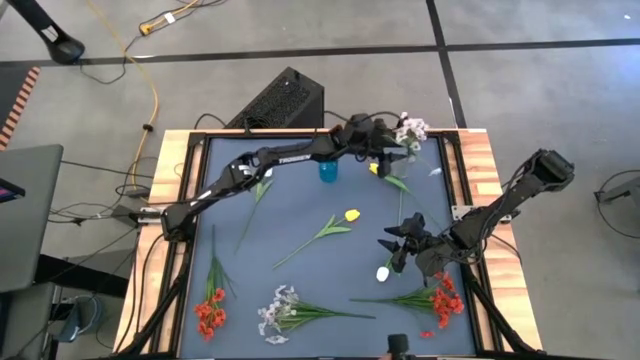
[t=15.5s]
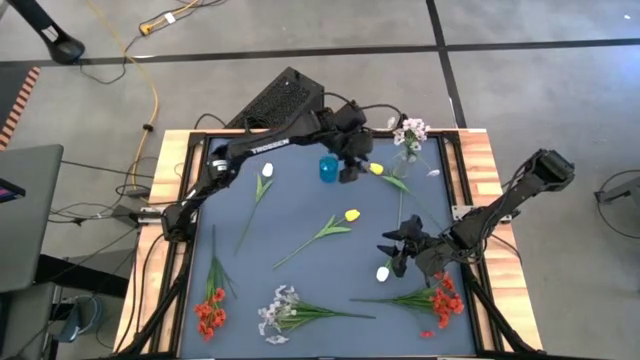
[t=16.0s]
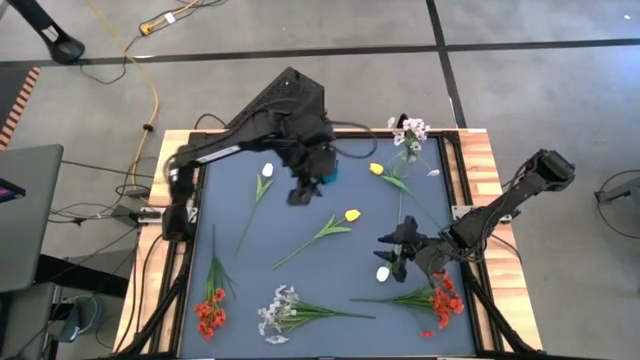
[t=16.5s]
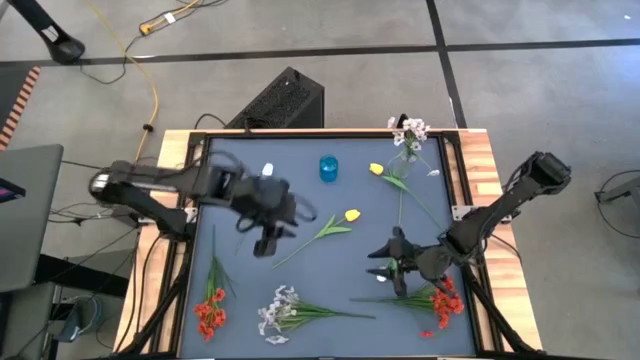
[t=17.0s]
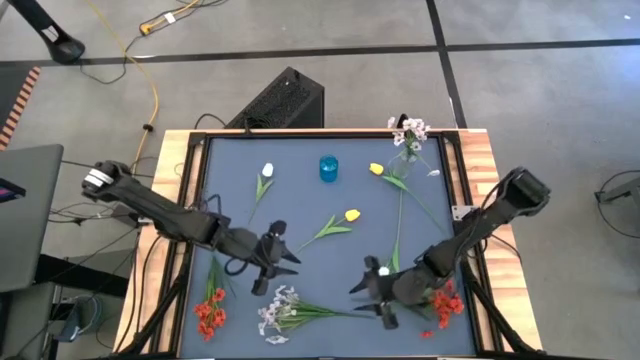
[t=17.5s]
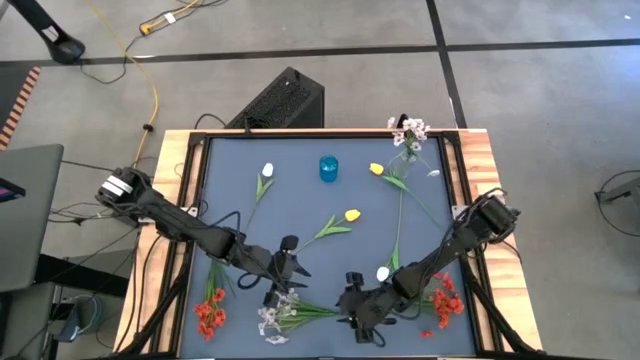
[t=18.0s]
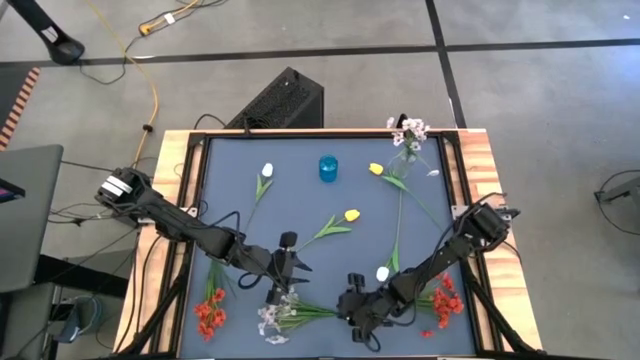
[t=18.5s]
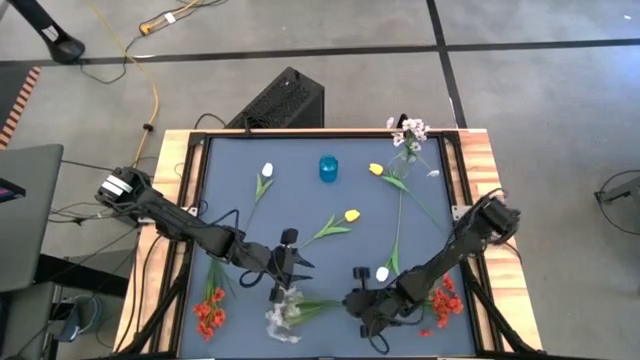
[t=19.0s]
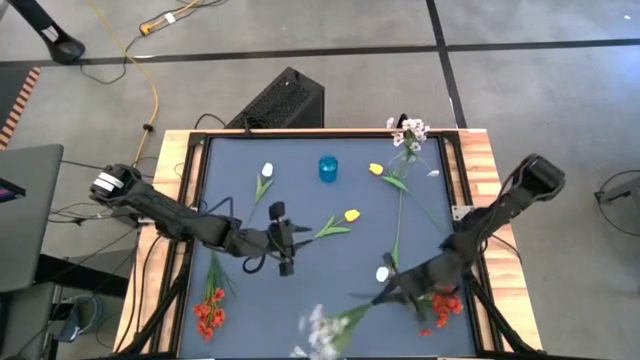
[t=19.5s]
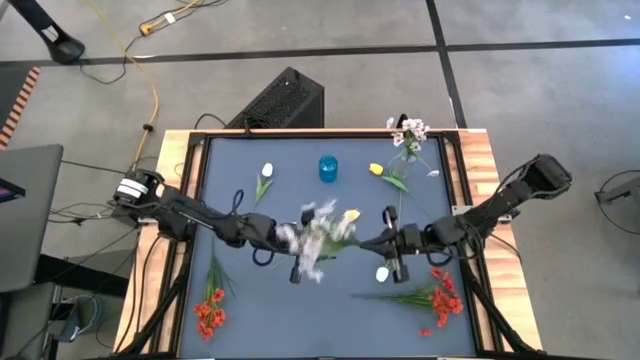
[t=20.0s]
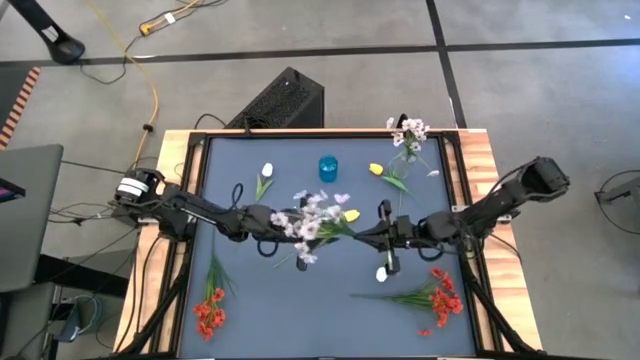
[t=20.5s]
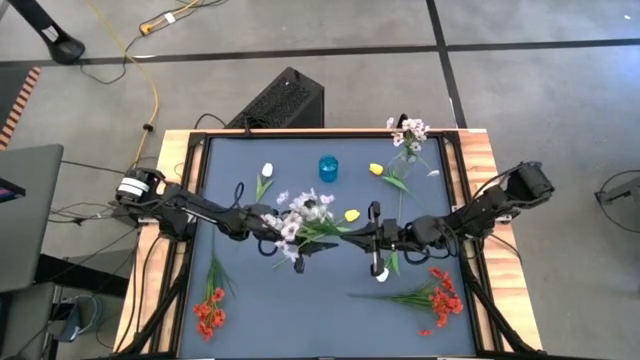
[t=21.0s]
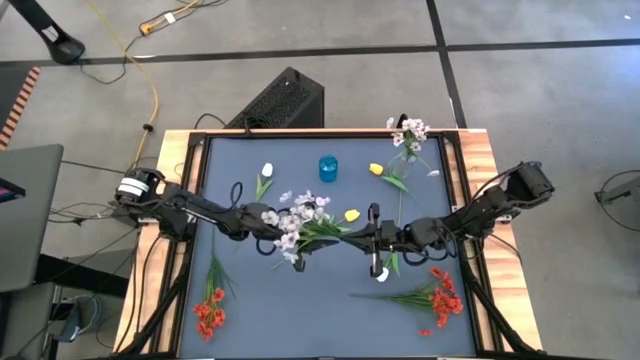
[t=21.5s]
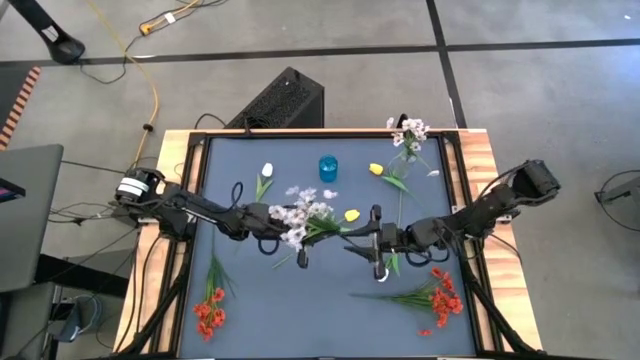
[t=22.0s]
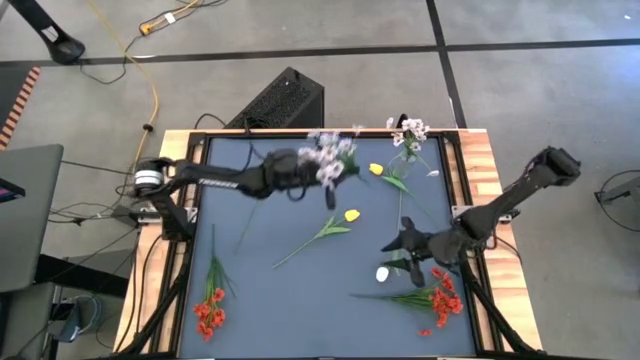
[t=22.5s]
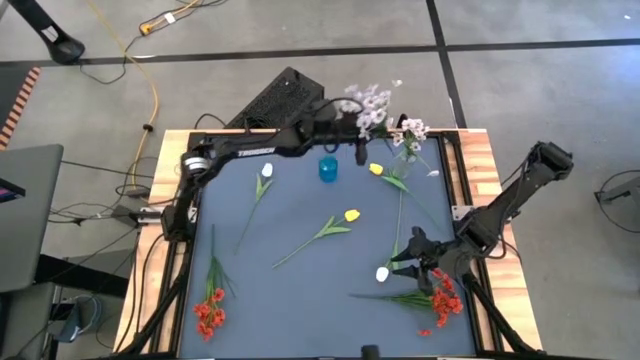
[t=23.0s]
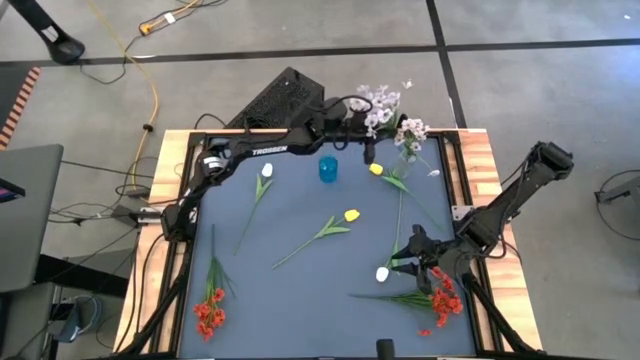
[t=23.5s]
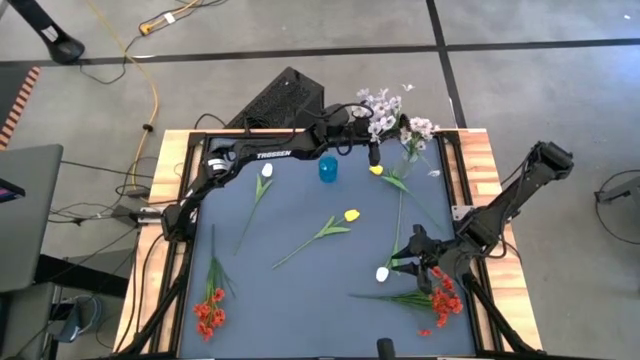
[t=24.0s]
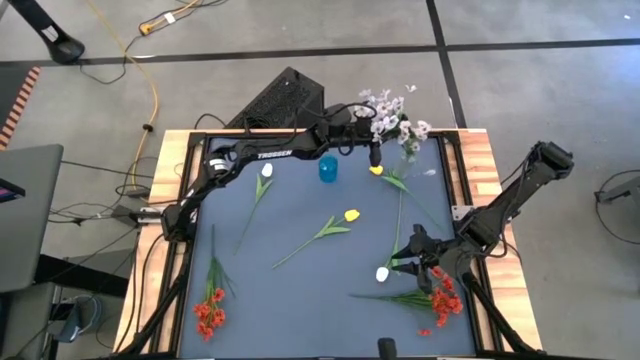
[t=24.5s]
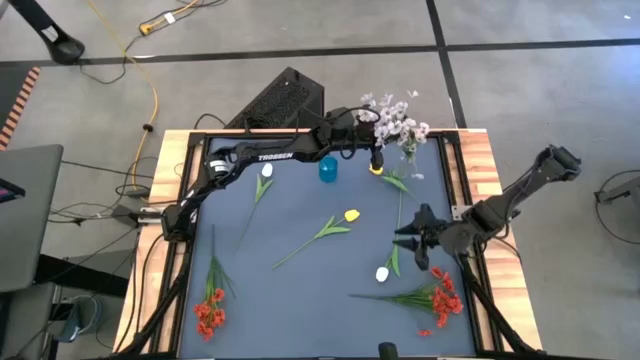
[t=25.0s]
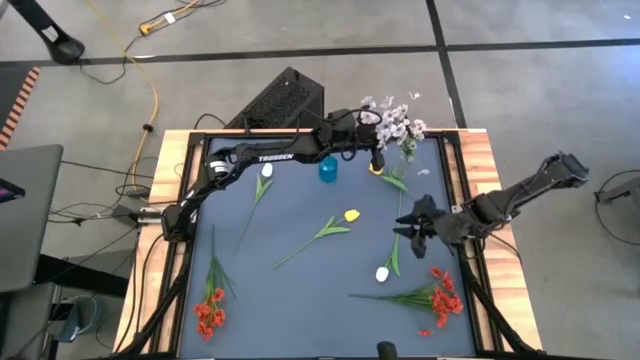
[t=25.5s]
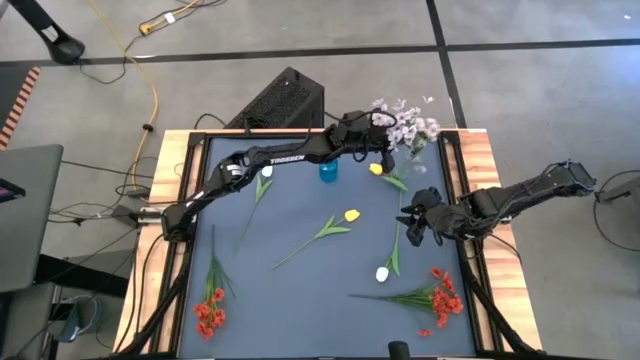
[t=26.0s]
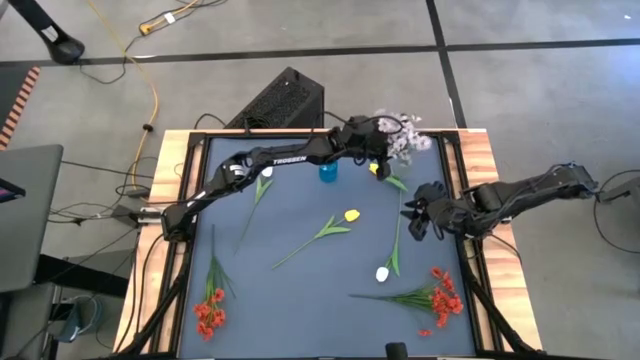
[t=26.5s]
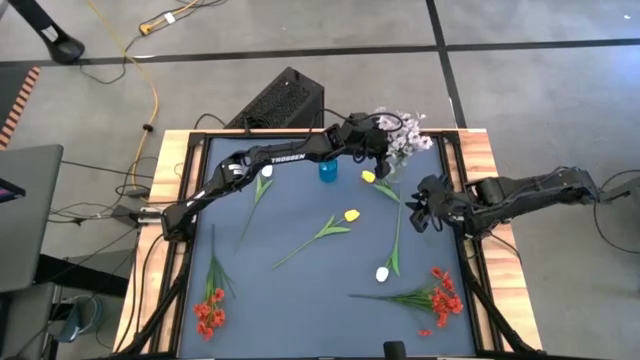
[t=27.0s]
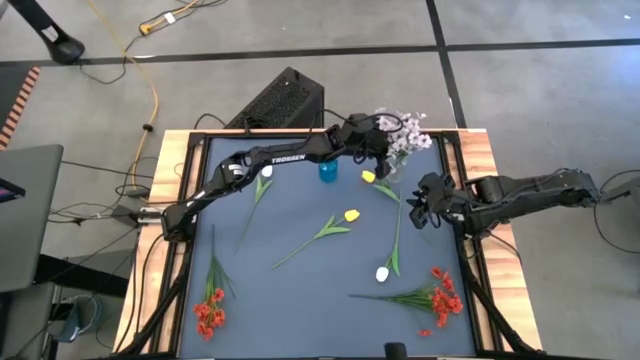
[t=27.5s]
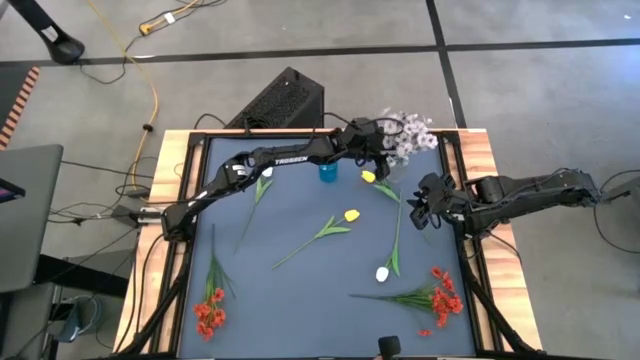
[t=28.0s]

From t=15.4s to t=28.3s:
Task: Sort flowers into vase by color
Put the white flowers into the transparent vase
